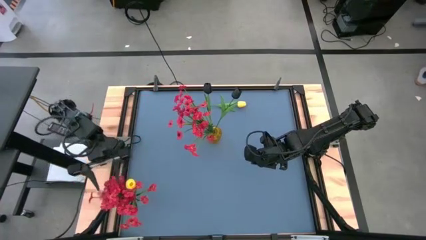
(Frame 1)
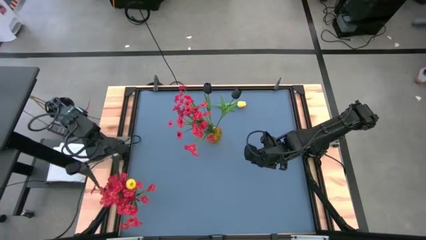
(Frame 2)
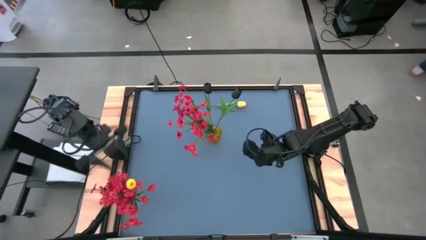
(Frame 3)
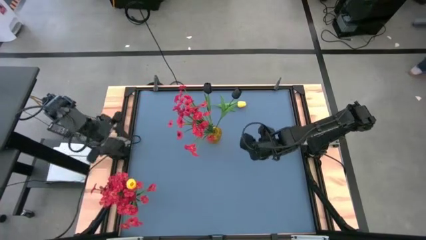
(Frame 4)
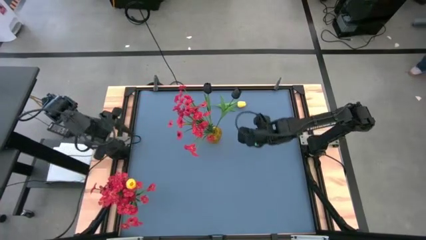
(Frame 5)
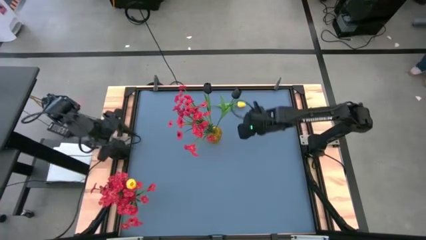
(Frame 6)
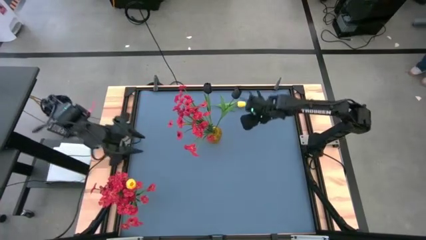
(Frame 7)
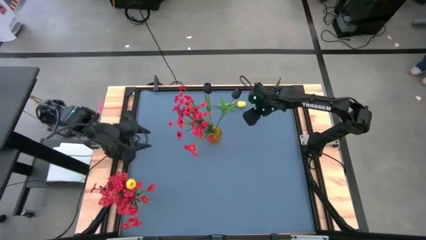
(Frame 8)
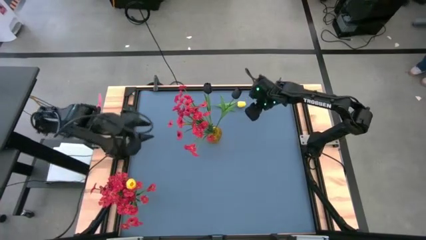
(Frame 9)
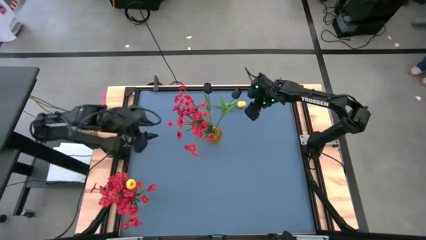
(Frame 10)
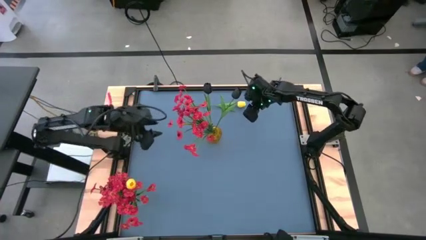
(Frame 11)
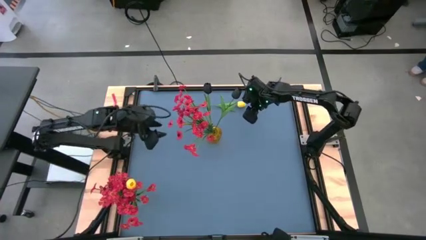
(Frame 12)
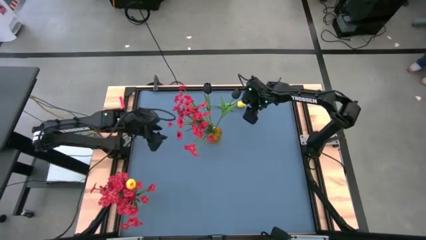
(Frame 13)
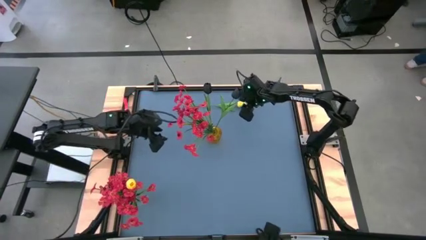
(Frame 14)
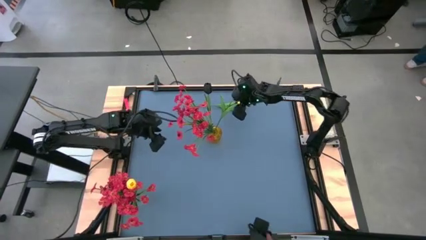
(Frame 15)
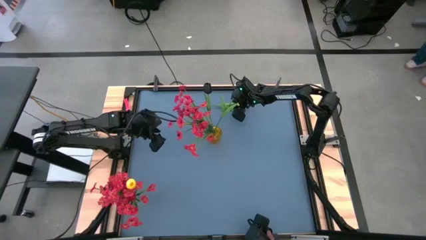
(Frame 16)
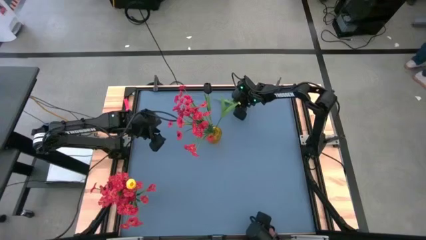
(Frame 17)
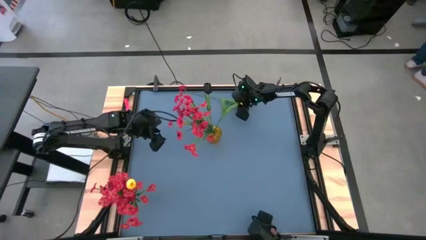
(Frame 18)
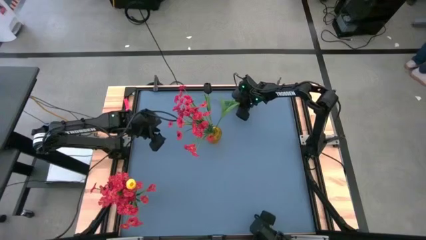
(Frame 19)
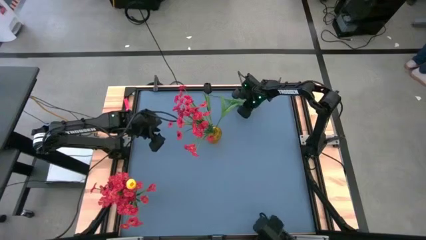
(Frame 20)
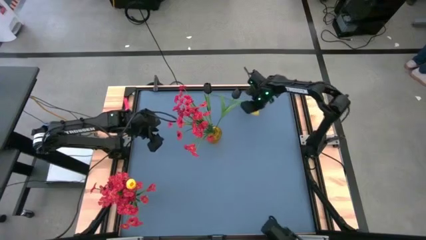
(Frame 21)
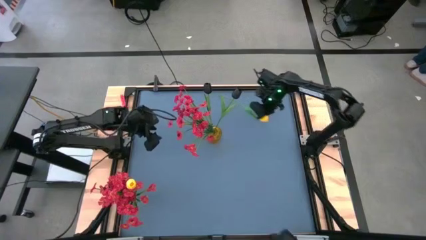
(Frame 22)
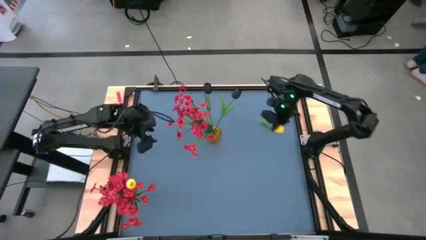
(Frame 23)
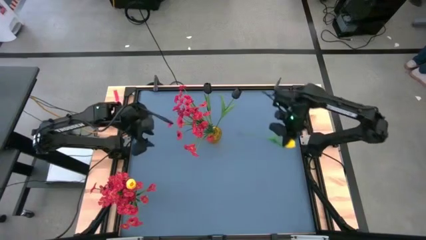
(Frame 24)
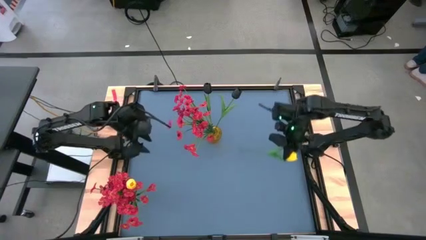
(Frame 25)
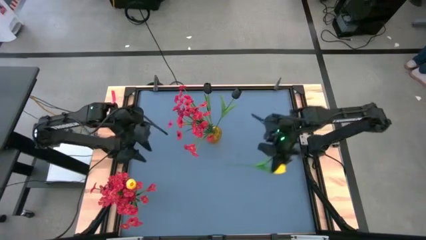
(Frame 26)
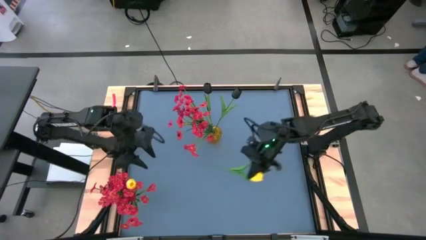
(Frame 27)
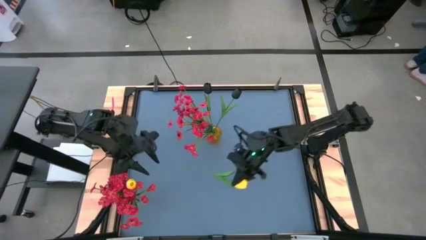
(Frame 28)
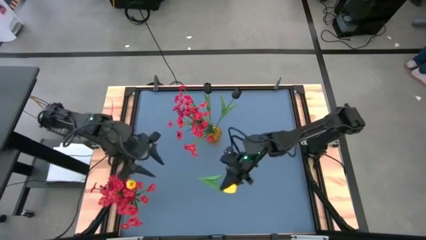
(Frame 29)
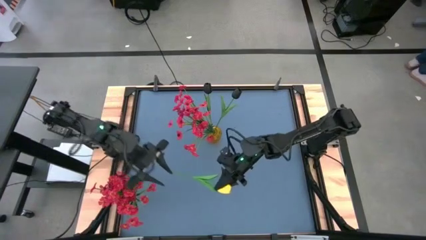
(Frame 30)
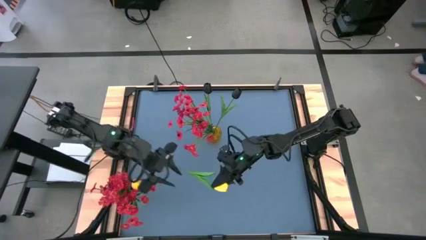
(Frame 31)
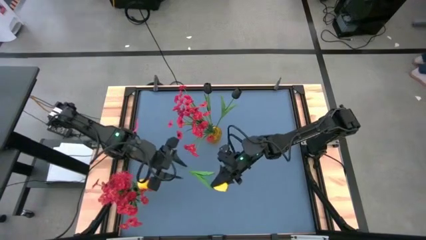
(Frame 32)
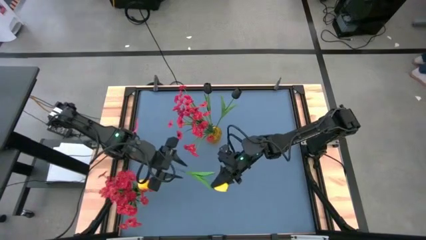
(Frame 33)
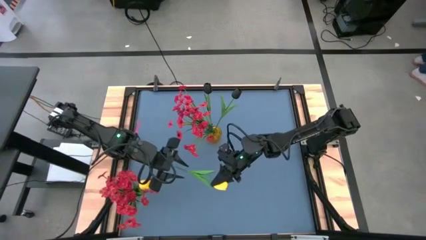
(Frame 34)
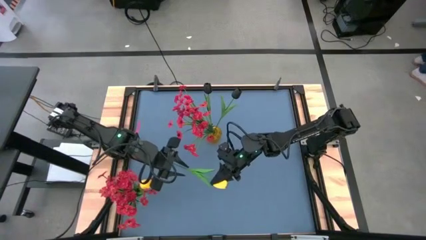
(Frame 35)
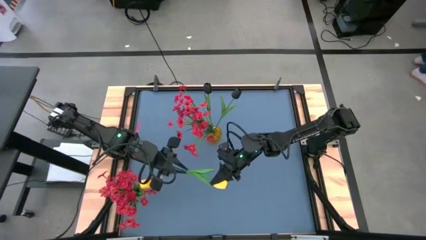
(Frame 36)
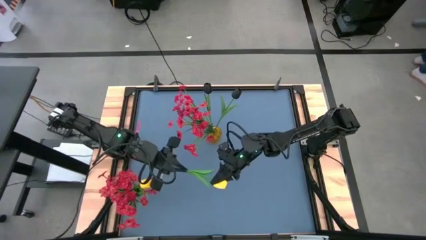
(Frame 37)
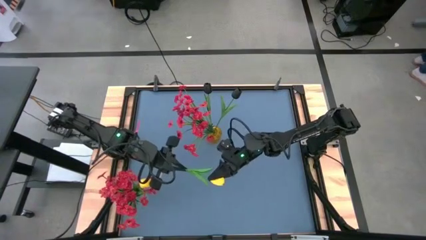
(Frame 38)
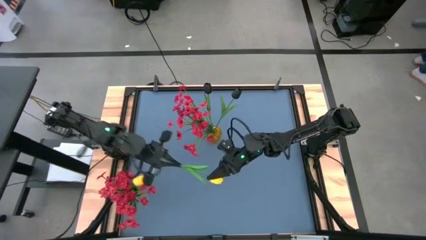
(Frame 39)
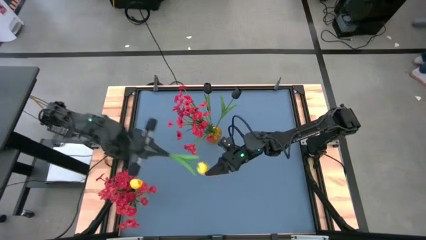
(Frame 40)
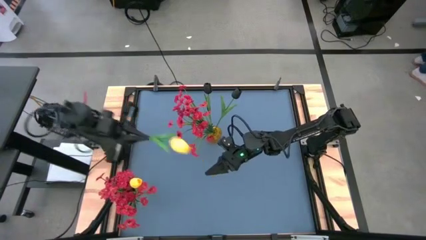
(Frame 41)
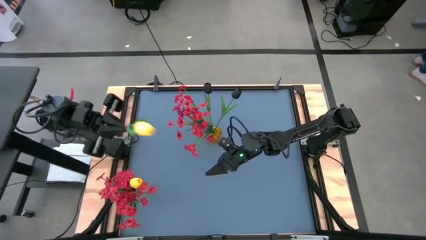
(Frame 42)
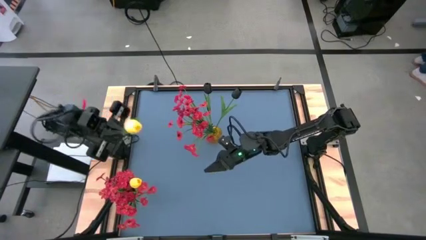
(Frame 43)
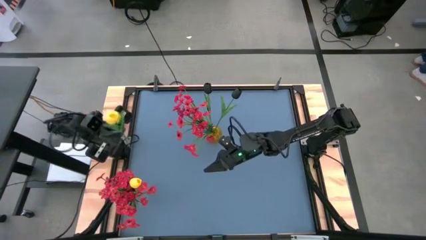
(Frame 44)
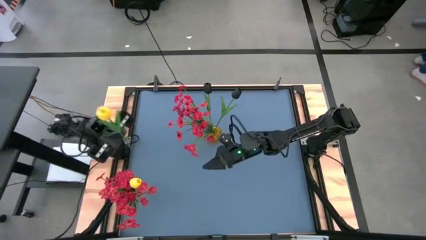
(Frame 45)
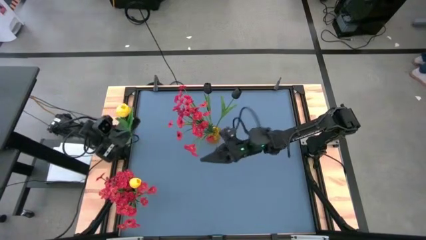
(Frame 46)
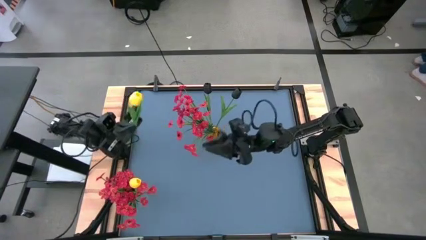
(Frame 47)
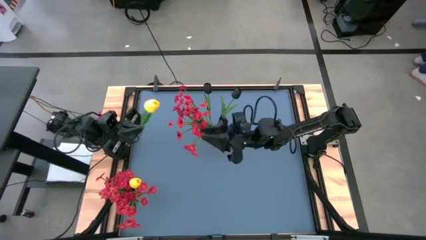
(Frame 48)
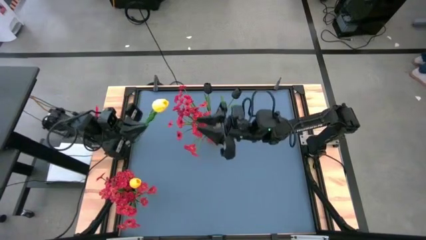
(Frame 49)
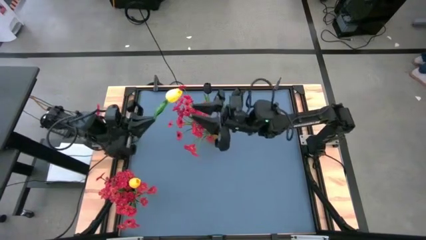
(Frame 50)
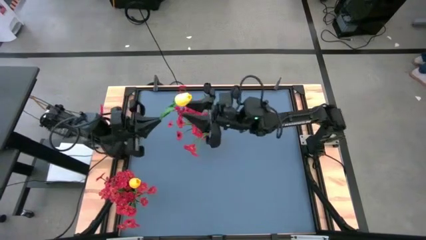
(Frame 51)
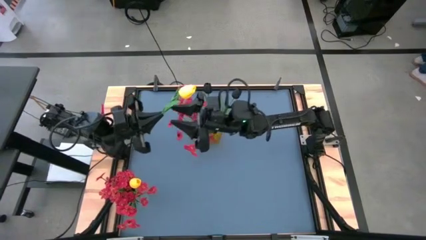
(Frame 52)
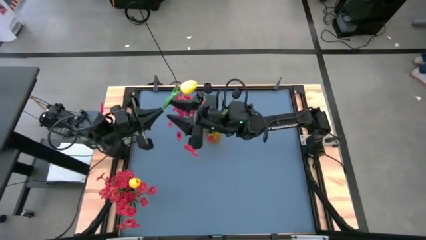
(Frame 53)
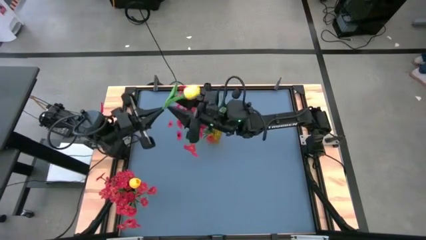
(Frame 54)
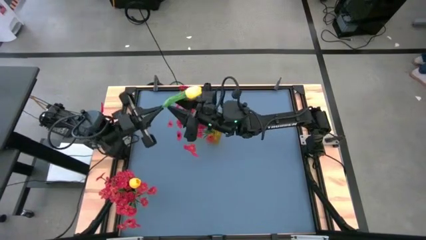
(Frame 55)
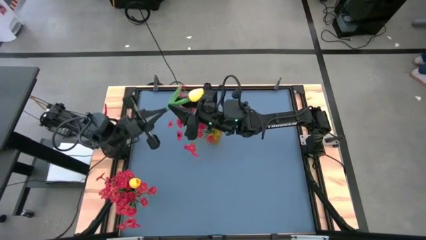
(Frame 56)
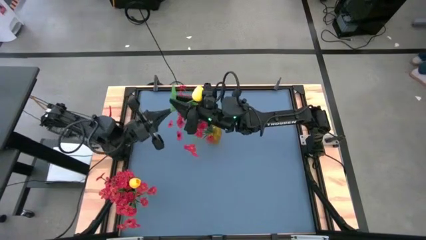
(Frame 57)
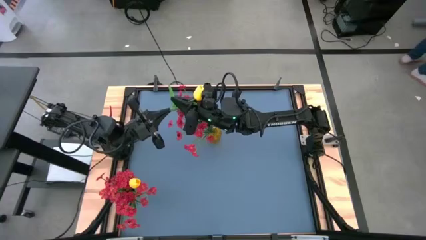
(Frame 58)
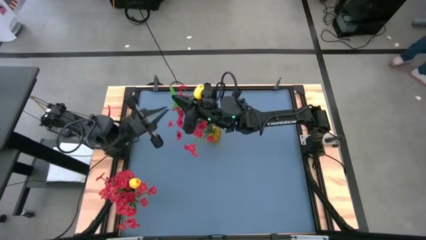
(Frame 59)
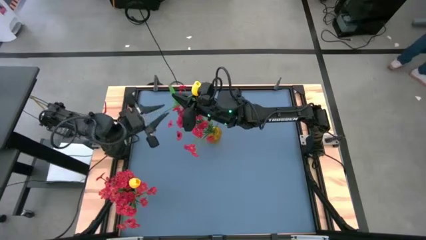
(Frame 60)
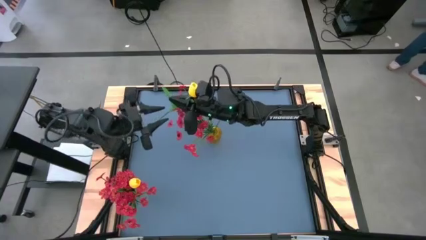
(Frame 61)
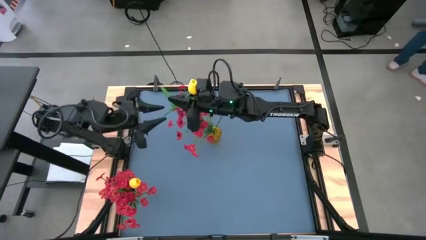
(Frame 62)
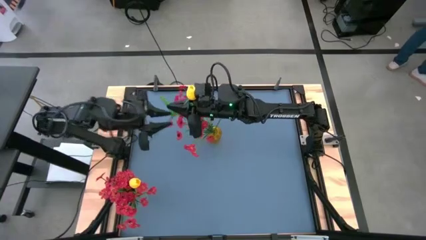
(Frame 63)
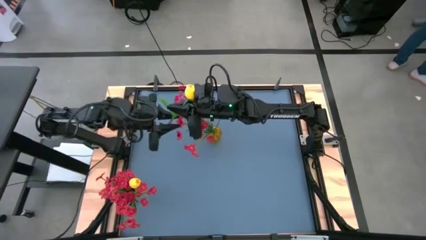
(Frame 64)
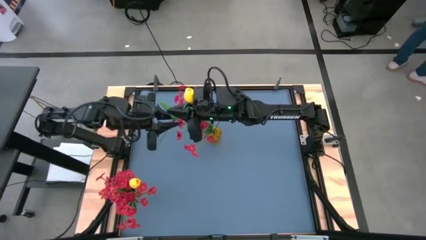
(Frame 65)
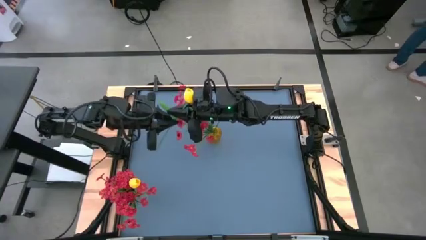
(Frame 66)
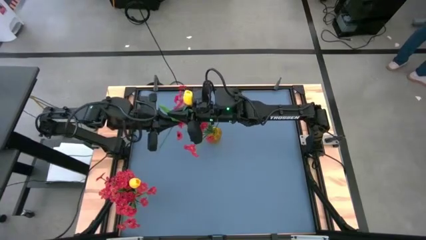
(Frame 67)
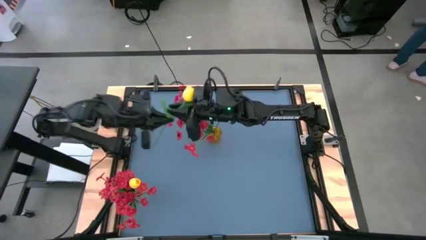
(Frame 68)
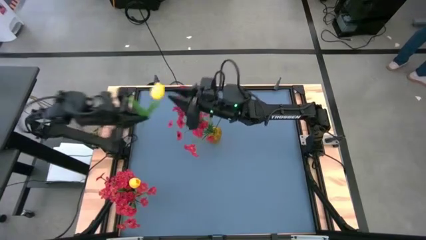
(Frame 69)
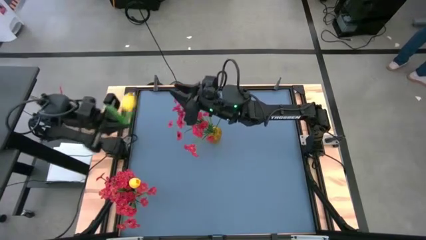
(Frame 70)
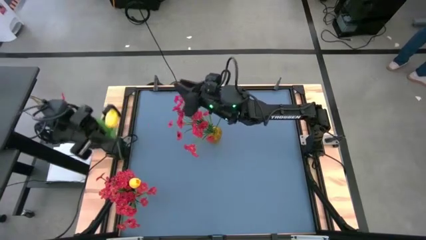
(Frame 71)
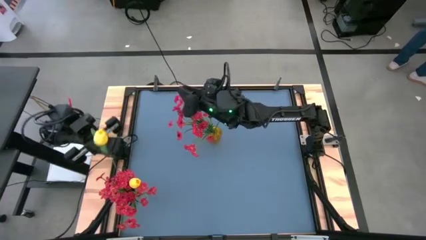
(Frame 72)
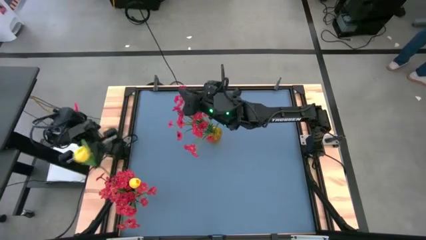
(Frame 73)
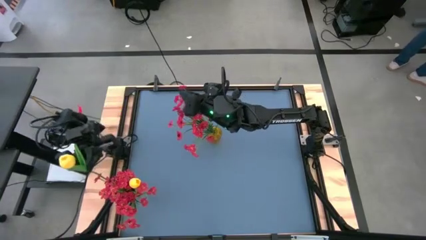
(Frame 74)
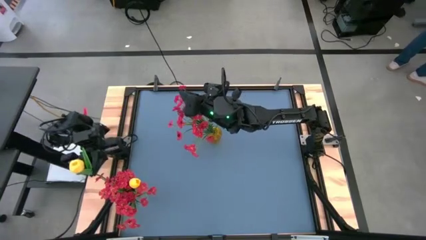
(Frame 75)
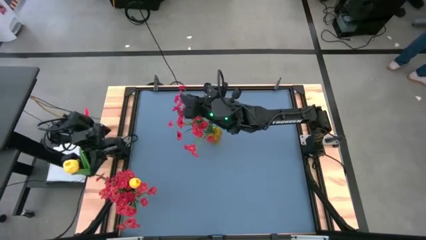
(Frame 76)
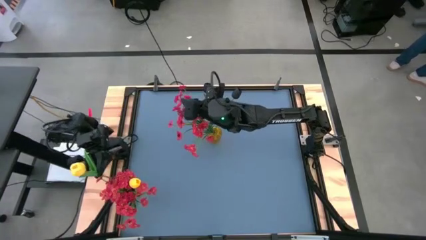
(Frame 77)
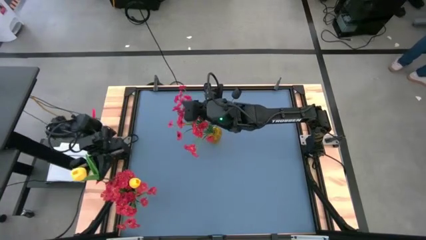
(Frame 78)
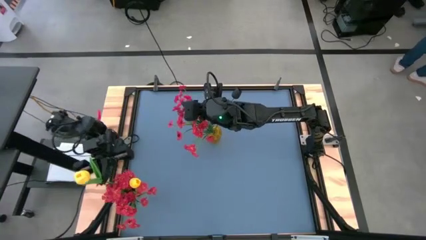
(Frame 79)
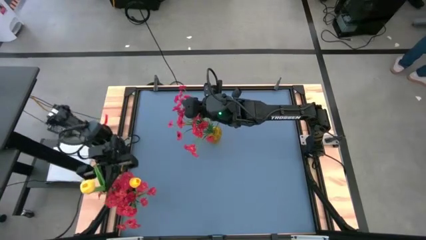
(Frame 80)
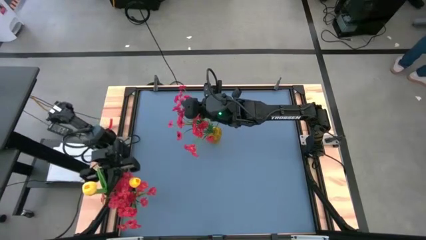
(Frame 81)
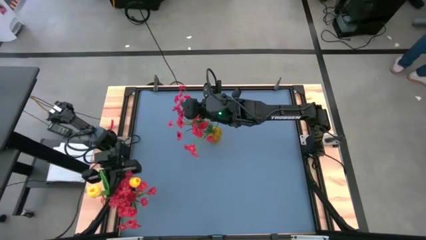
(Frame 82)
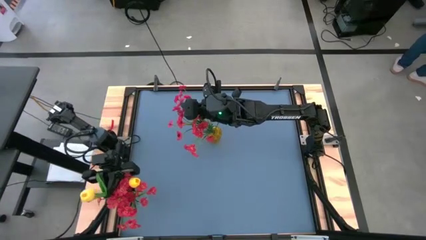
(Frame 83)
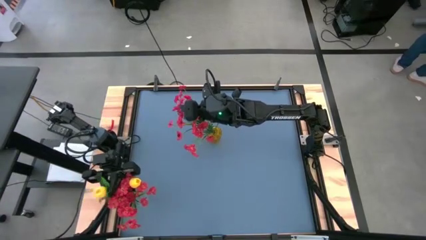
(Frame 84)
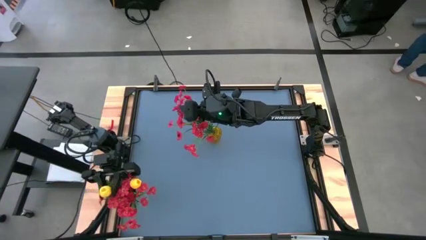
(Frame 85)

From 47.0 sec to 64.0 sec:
Task: Sort flowers into vase by color
Put the yellow tulip into the transparent vase
